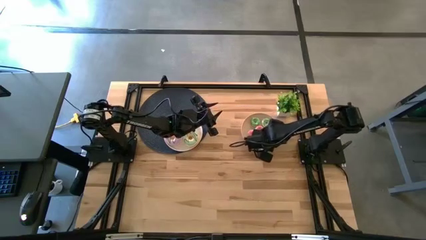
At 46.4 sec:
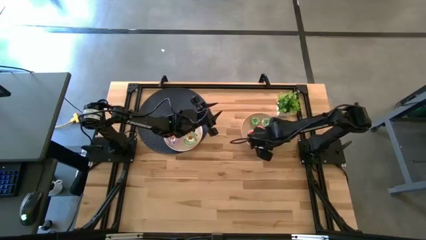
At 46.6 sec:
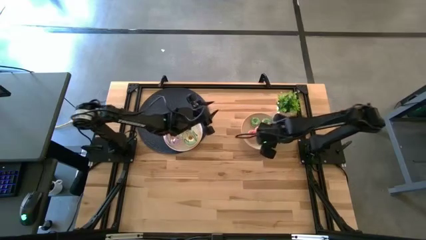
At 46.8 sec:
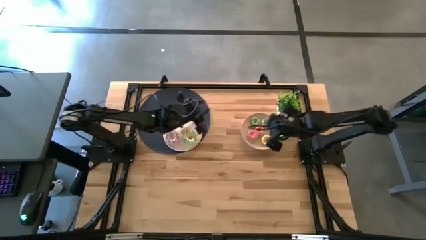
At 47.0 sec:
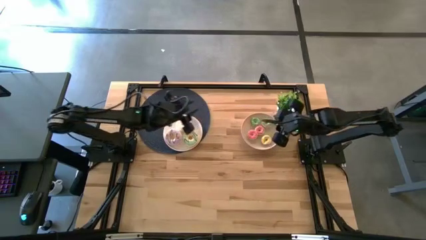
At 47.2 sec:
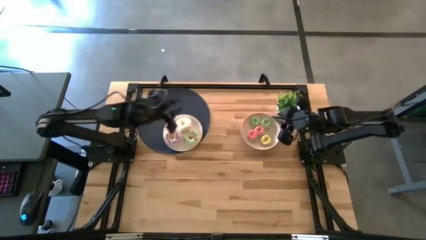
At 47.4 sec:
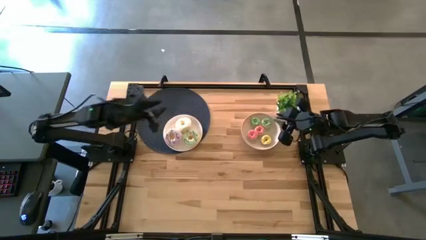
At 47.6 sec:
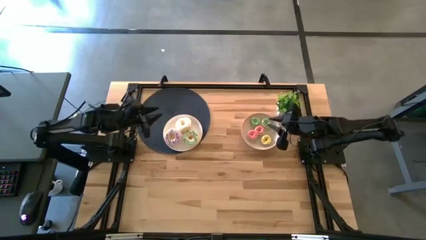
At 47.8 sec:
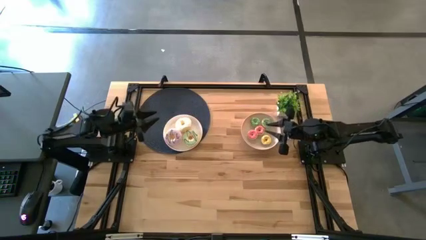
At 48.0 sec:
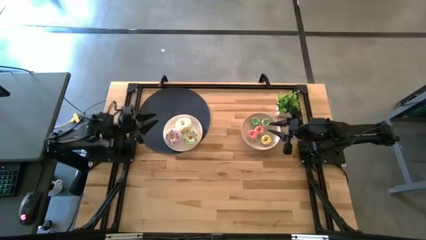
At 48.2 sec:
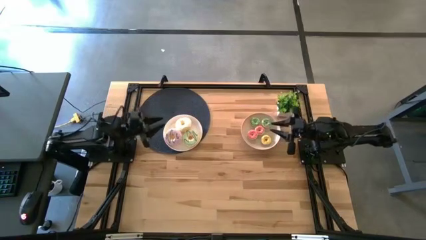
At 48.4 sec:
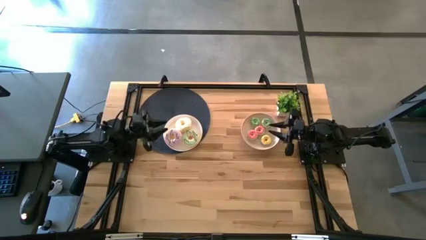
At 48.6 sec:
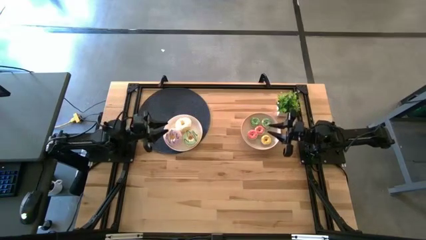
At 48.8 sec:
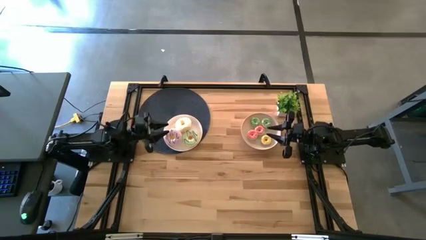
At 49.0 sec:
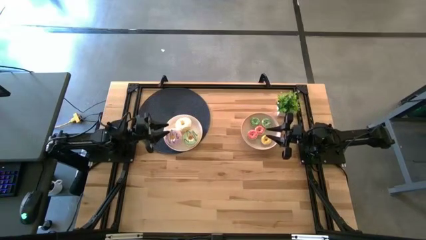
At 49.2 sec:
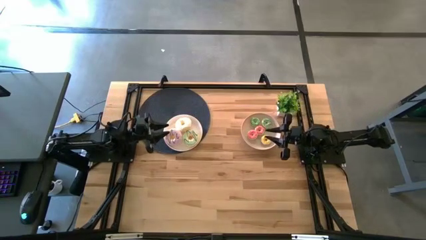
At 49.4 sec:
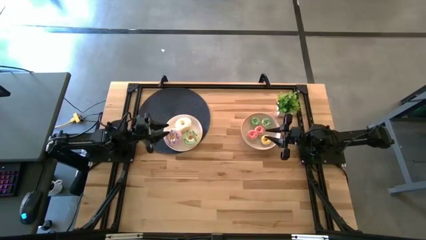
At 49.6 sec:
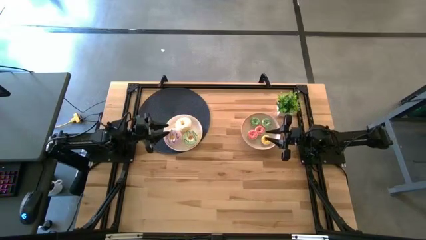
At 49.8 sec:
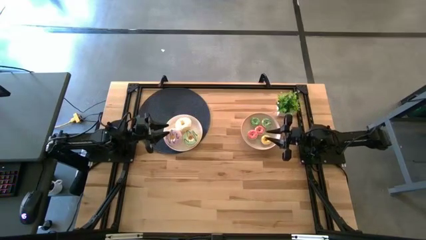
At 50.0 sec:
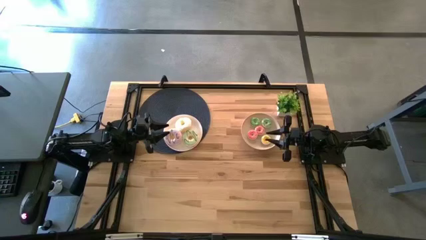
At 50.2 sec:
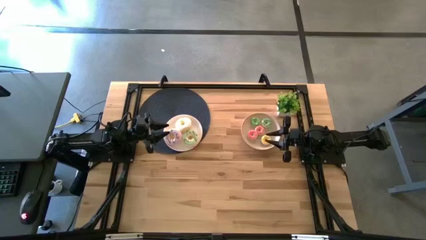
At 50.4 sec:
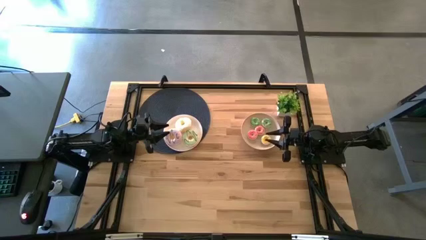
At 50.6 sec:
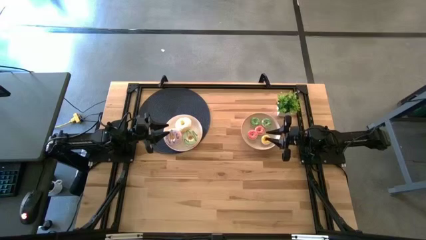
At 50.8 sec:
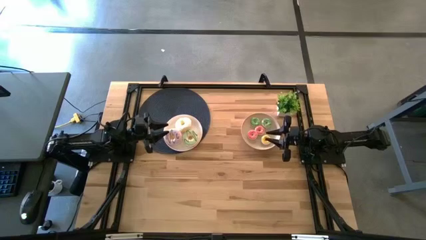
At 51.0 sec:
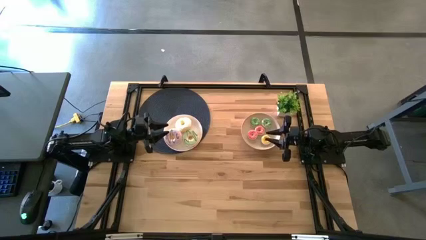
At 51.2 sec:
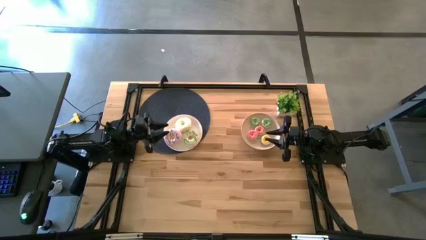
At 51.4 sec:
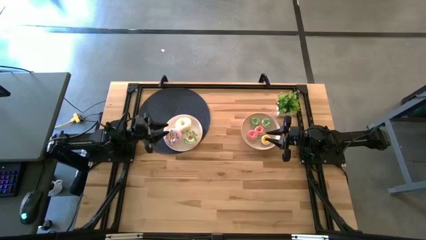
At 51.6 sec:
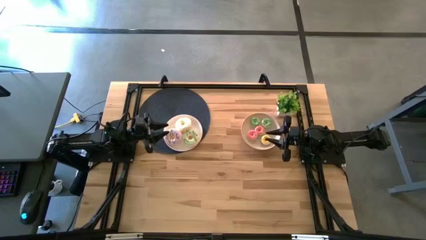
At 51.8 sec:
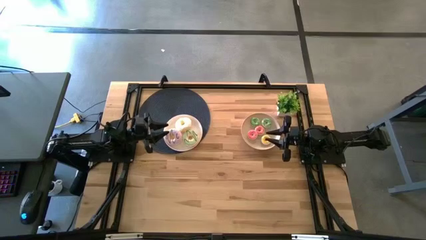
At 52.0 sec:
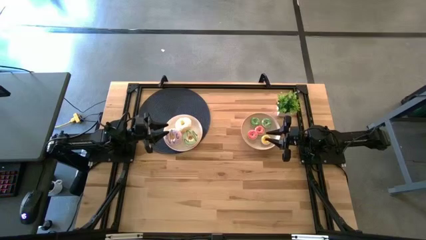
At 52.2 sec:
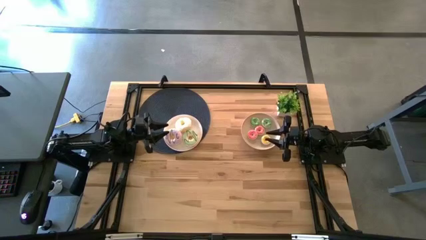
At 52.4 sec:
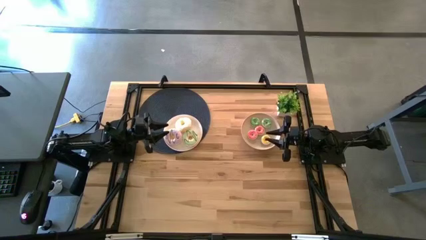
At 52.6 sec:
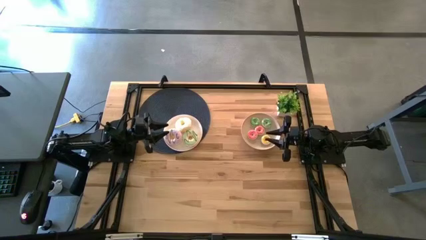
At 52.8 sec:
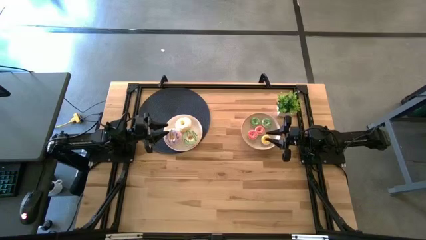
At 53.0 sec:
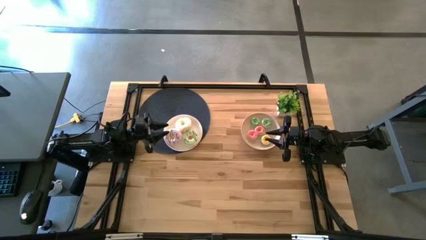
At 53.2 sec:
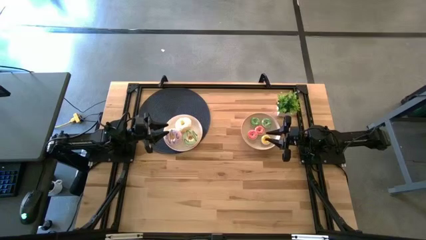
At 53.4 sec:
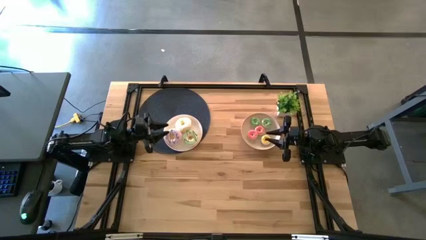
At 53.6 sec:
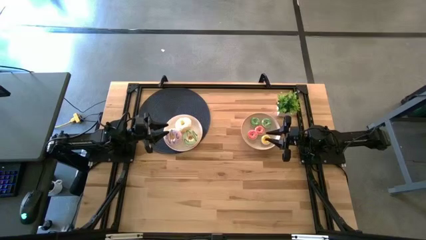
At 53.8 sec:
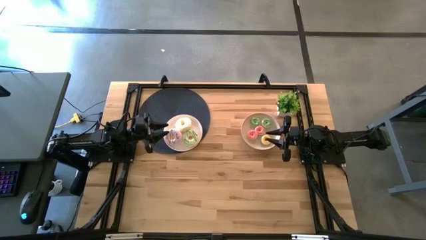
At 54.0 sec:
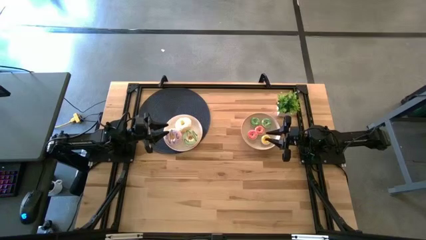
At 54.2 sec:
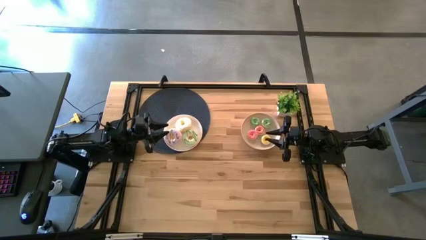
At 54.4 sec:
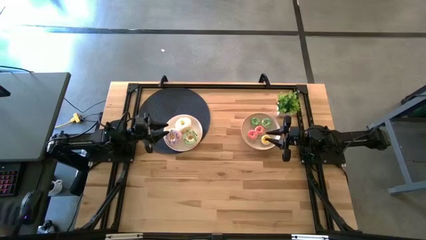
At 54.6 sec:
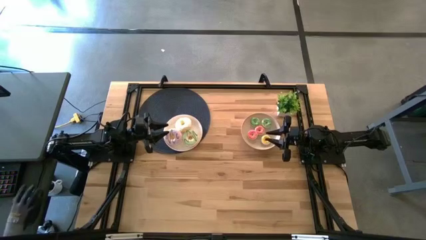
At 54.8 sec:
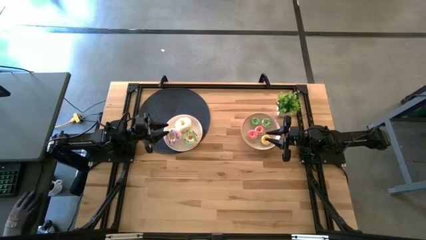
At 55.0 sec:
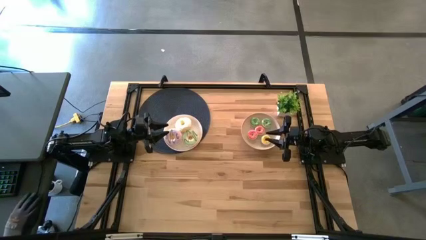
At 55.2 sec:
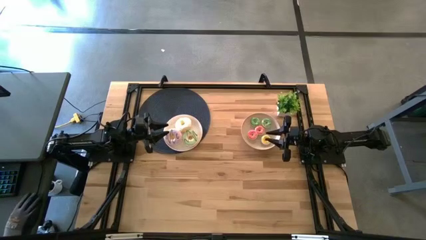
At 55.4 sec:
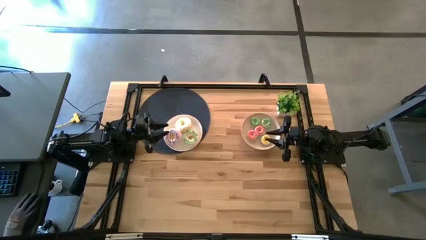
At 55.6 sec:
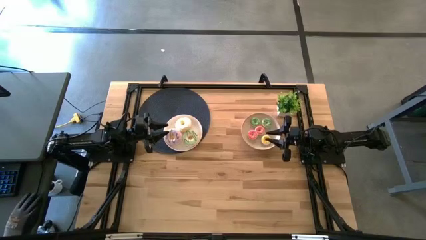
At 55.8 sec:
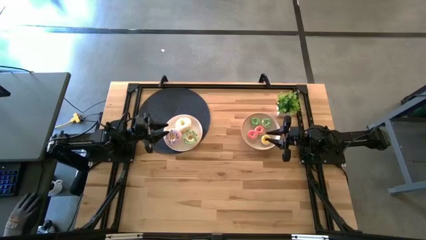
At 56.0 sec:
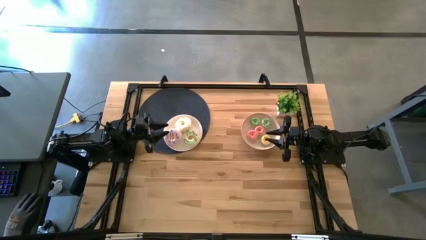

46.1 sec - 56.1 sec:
Task: Pick & Place donuts
Return to Home Position
